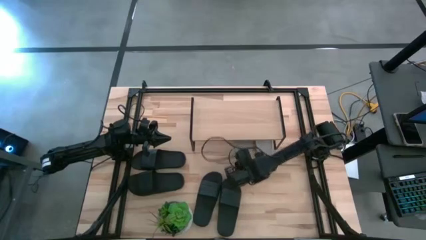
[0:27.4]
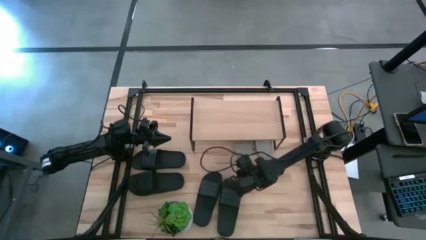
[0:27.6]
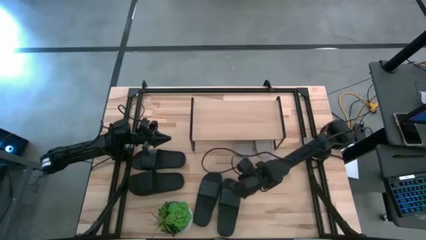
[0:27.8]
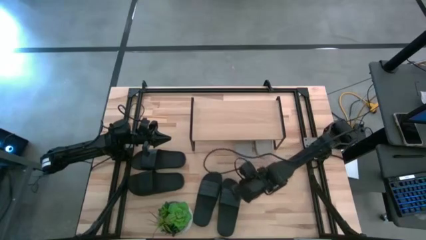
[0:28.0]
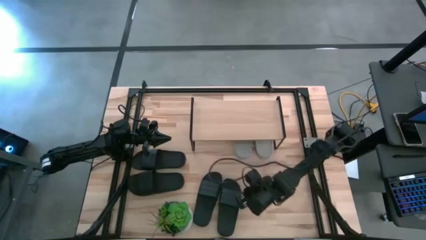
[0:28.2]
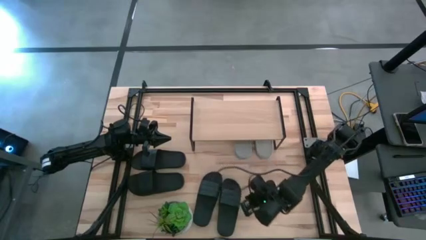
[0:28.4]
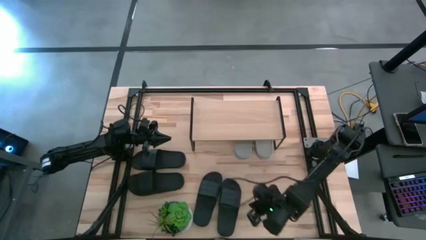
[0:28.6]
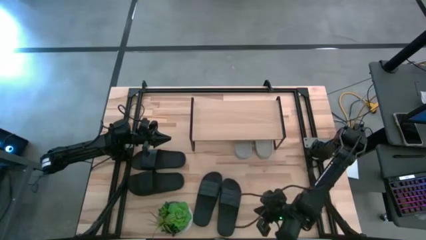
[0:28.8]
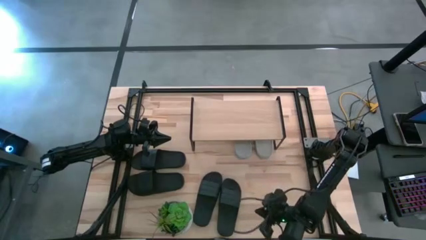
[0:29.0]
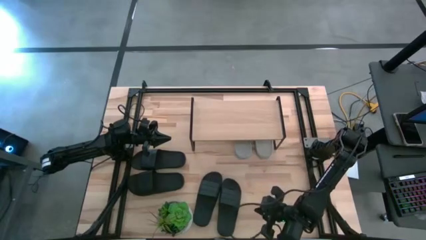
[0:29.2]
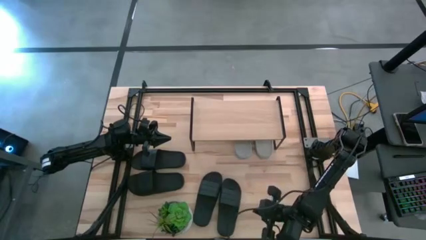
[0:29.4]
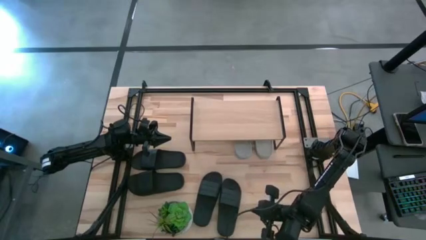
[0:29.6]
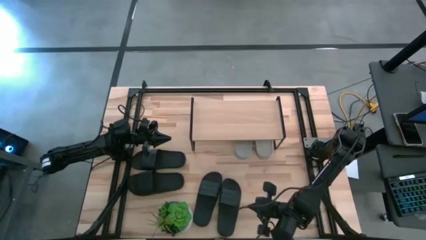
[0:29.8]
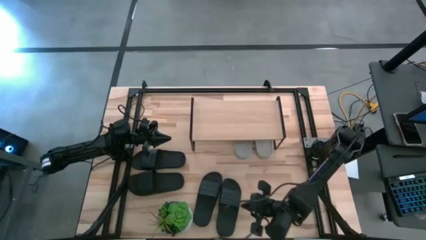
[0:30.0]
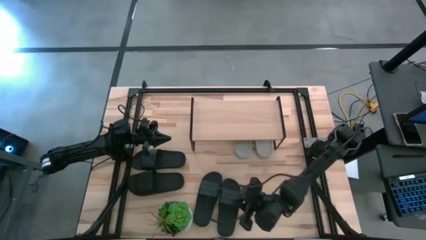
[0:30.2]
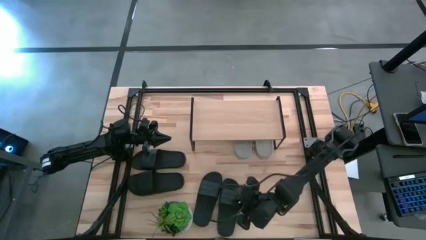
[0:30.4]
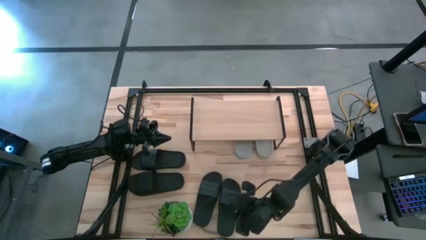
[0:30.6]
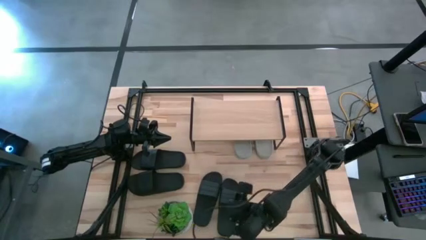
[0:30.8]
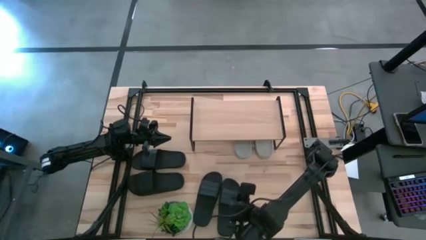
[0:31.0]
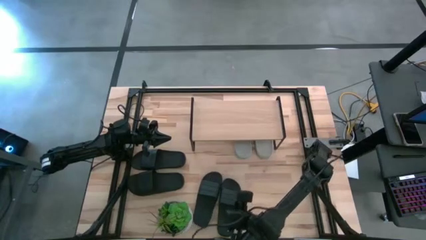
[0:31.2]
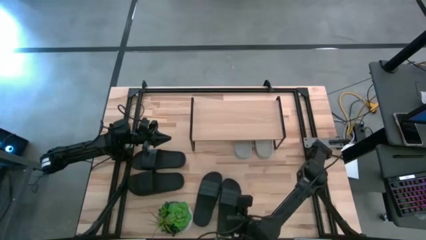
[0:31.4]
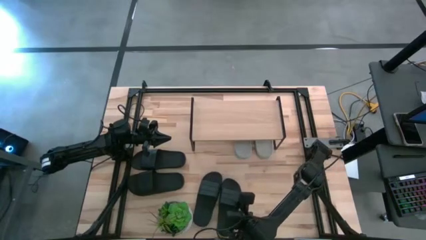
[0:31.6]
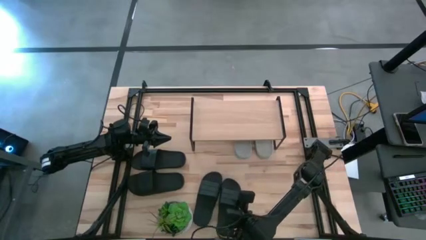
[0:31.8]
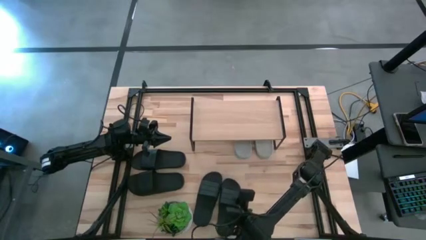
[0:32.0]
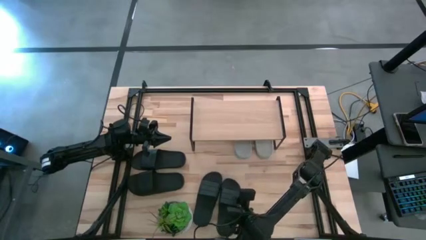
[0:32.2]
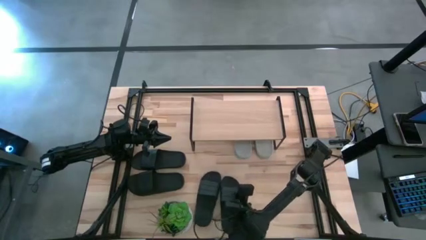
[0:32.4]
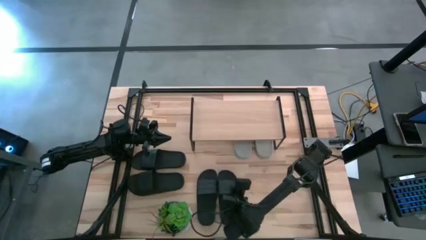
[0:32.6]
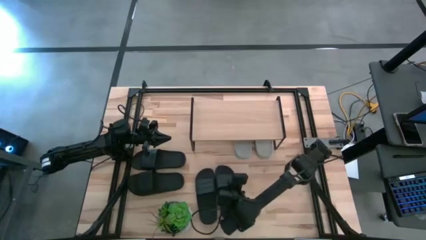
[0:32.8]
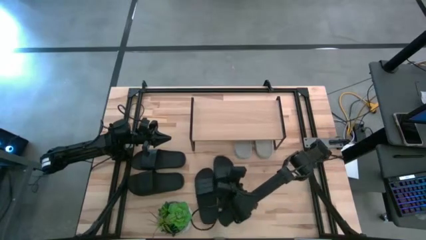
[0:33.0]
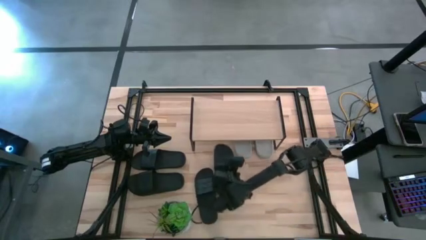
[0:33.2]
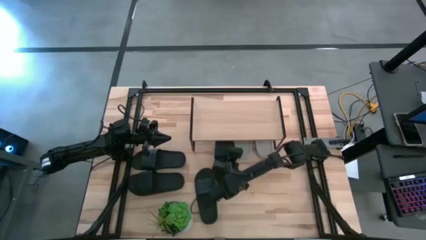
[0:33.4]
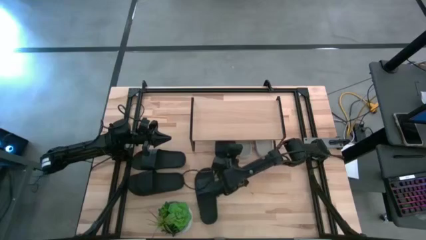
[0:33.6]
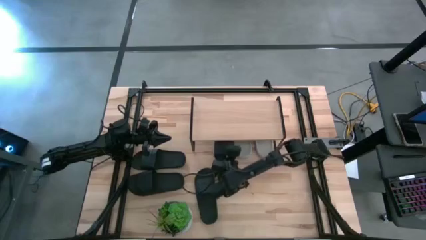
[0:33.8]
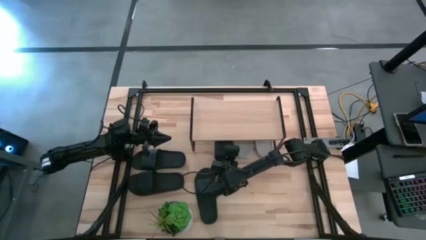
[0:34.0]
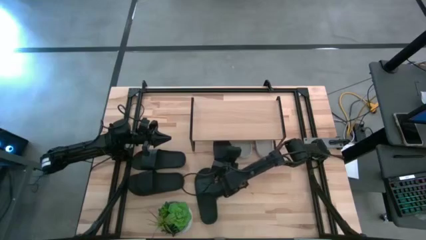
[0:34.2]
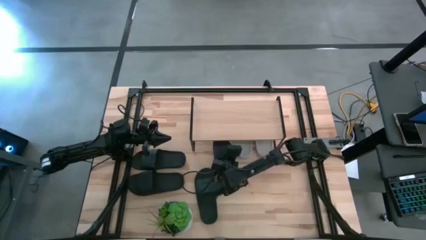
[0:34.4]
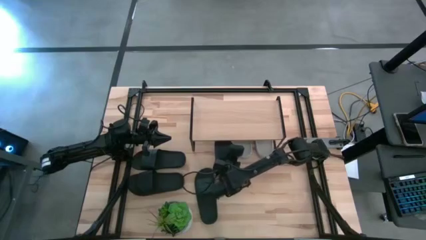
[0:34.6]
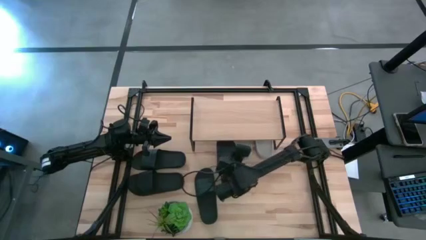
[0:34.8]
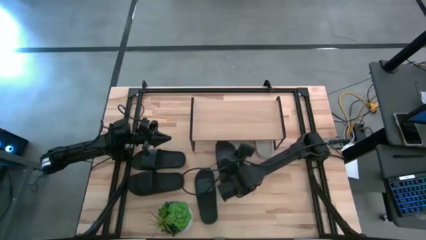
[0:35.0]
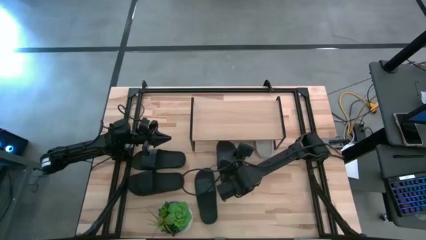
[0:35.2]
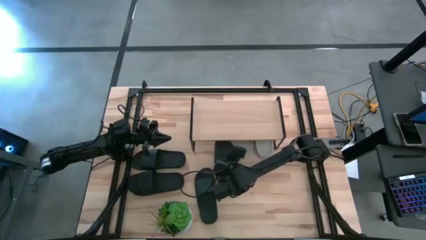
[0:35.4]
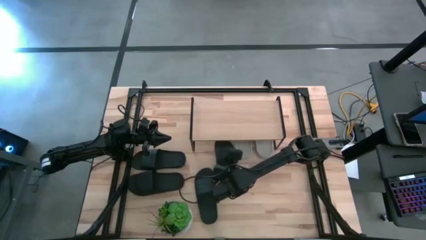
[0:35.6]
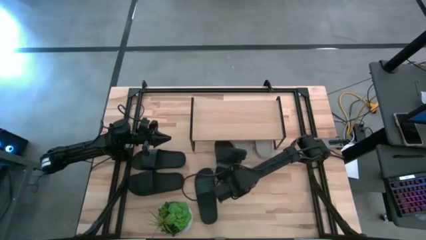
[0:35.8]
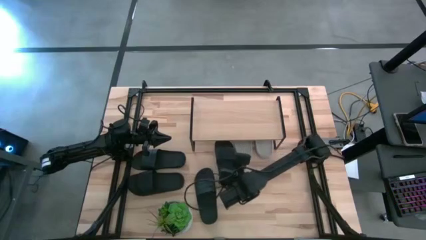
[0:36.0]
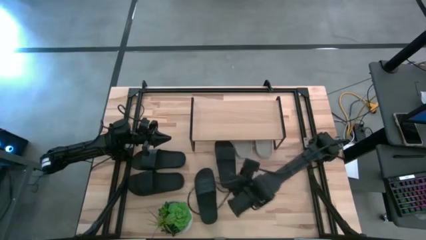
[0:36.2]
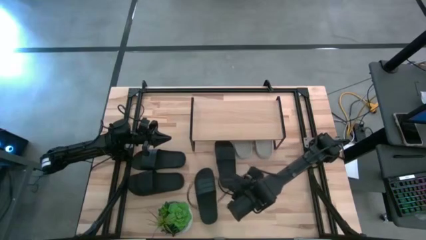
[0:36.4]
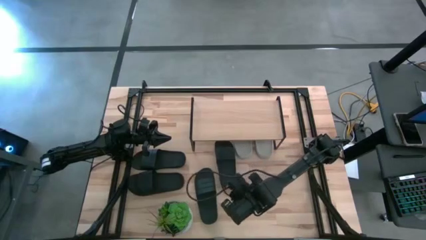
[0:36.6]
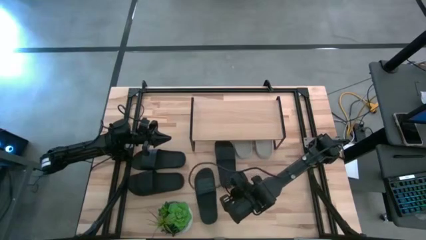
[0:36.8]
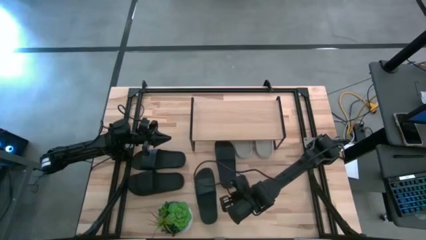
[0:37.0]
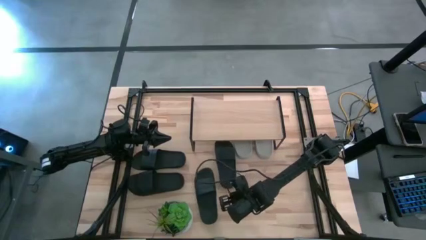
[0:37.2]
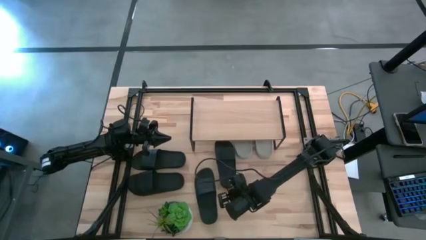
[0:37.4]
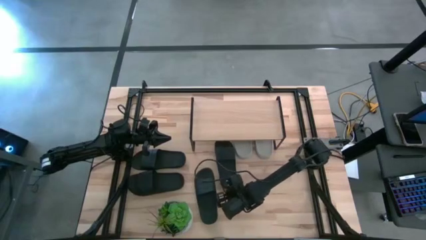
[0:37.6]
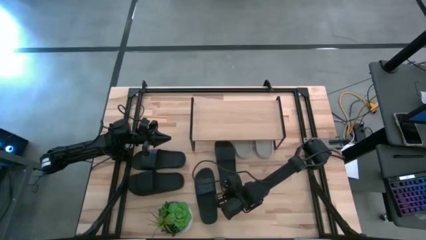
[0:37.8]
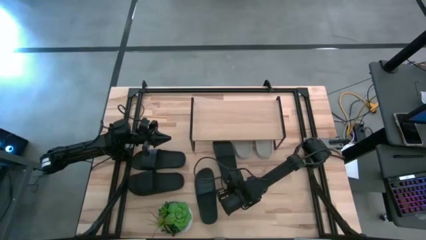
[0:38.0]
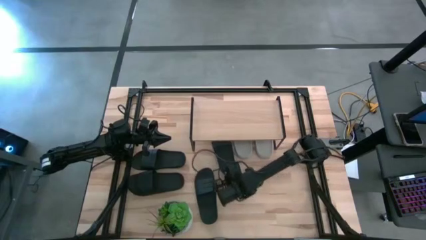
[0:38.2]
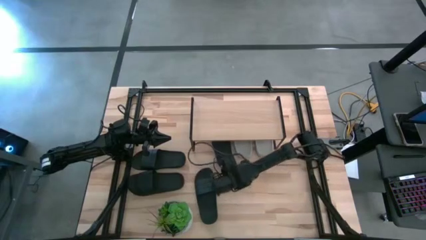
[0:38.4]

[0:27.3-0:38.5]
Task: Pick and place slides into the shelf
Put the black slipper under the shelf

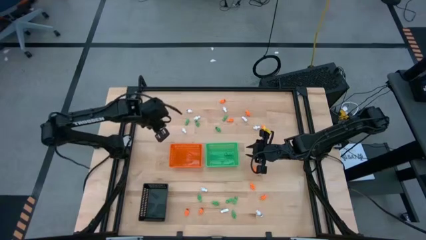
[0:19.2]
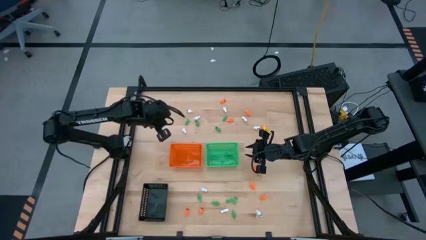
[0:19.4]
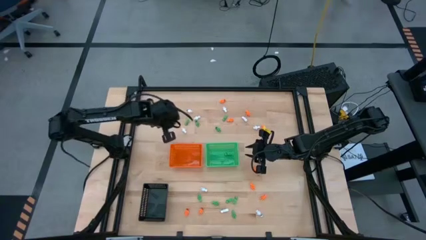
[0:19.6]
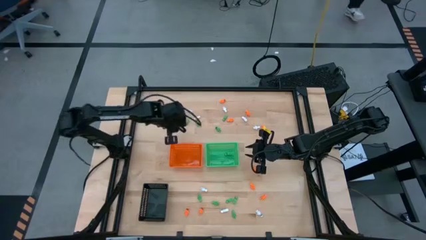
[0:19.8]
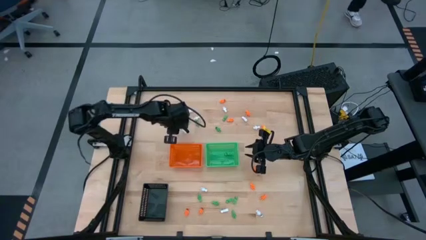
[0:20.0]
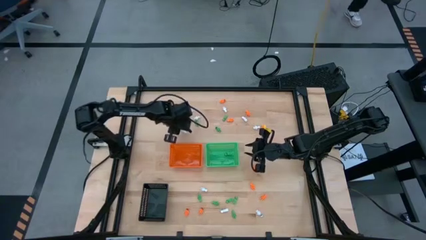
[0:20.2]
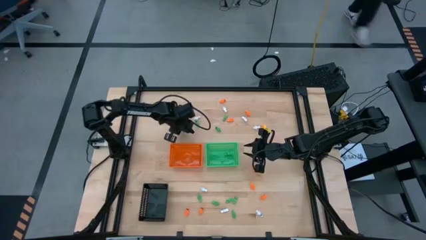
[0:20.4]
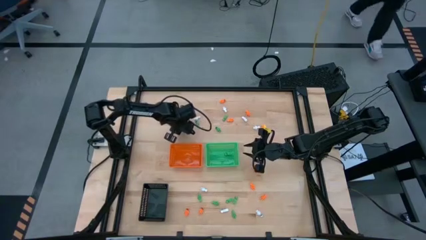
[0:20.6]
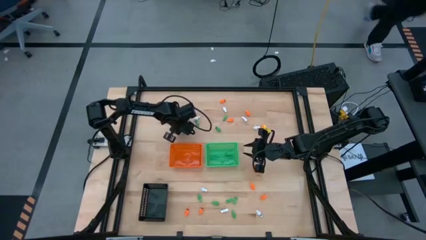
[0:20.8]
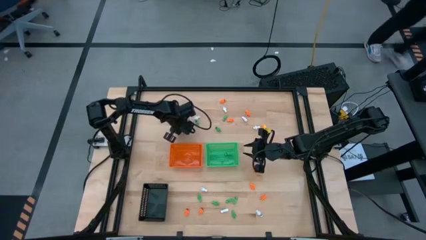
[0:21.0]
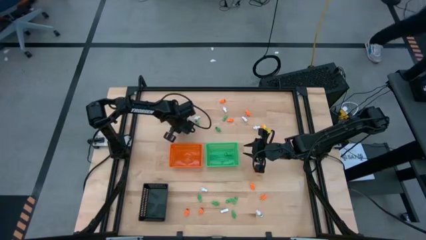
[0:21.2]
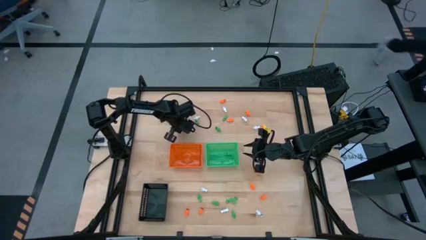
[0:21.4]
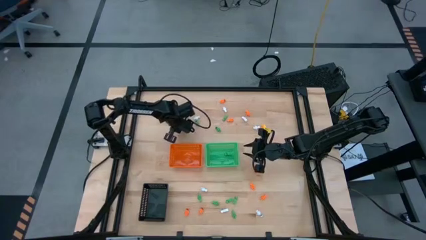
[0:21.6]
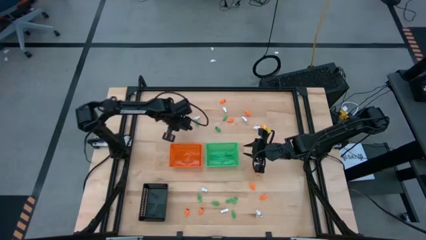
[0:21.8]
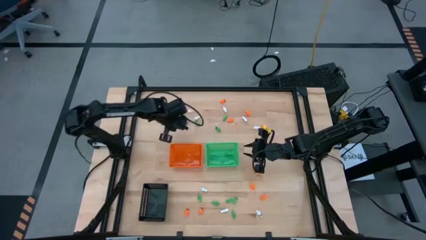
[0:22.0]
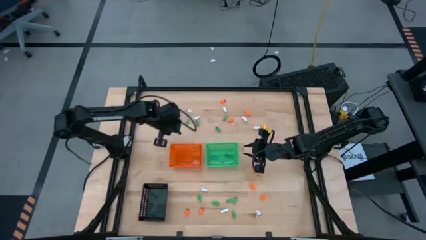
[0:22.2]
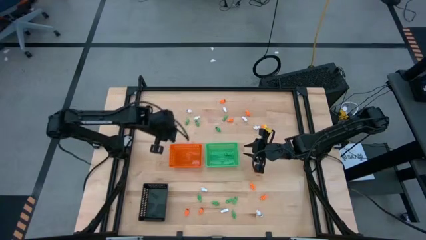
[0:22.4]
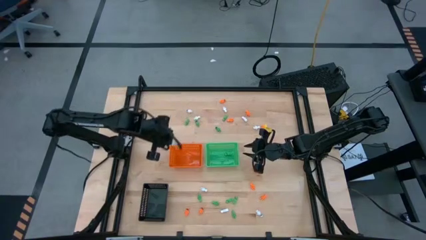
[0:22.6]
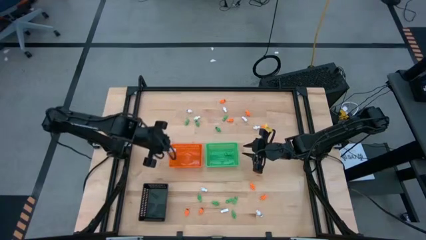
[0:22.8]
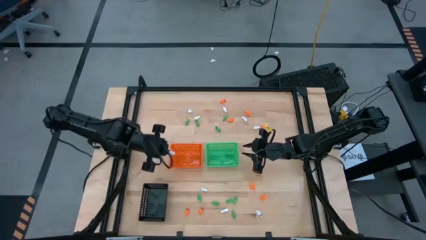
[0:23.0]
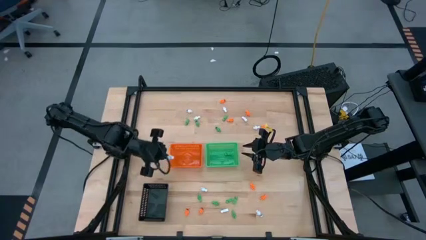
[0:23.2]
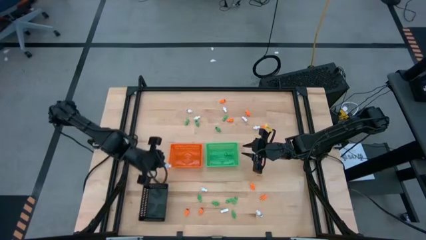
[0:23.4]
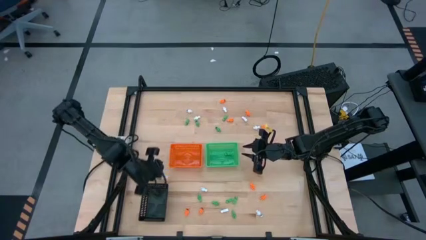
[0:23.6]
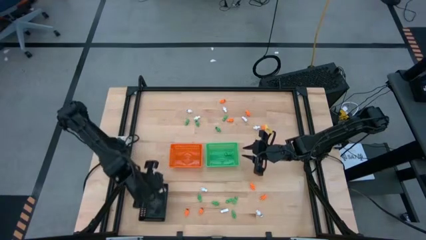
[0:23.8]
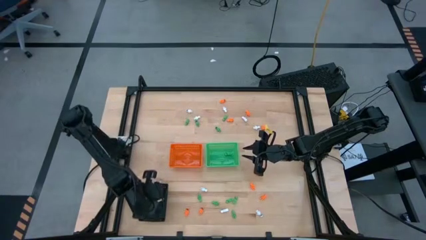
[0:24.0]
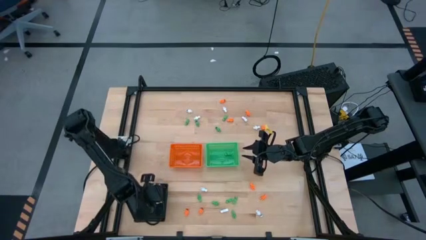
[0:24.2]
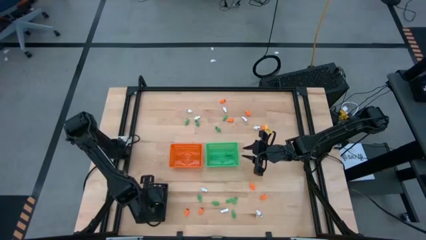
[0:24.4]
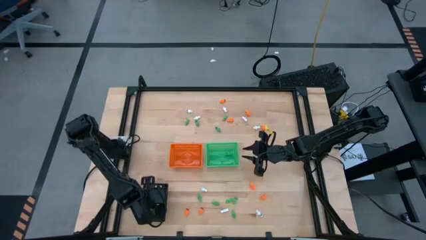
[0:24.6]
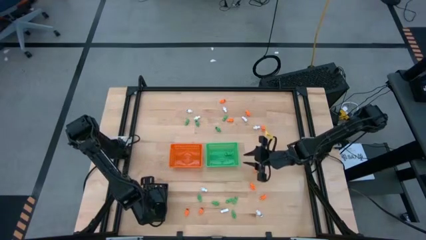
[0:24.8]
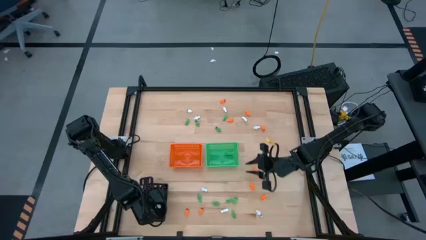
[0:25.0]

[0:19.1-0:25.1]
Task: Sort Halloween decoration
Put the white skeleton toy into the black bin
